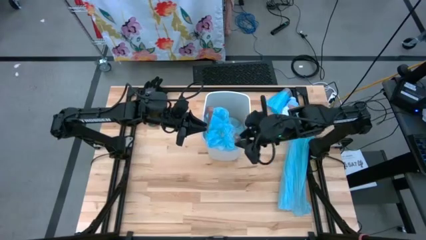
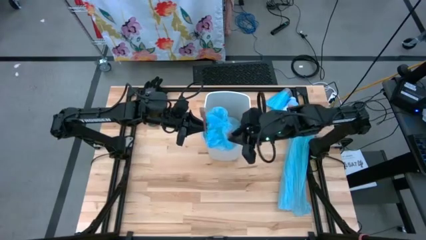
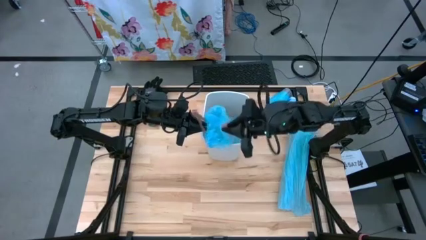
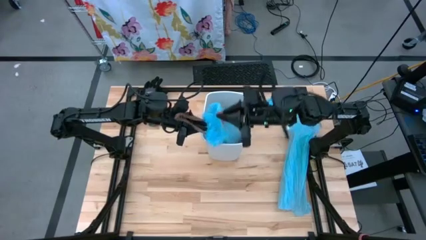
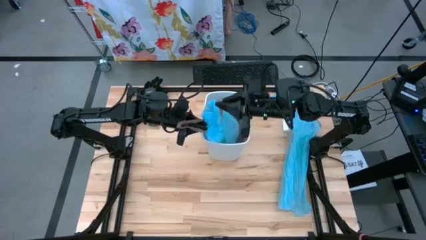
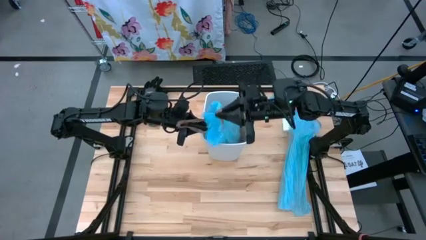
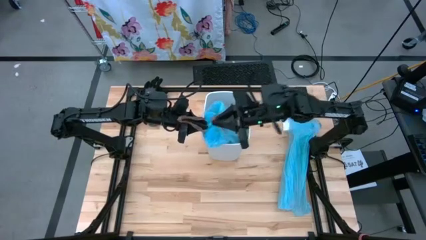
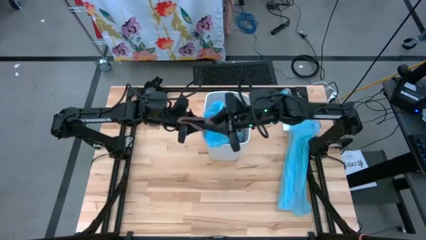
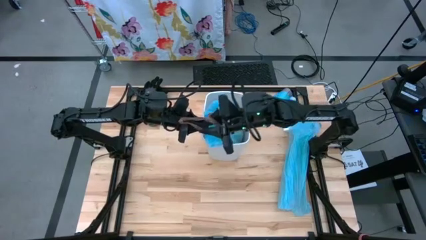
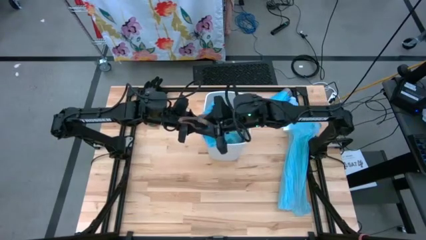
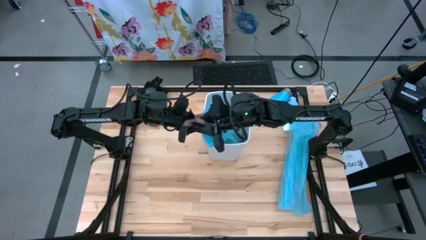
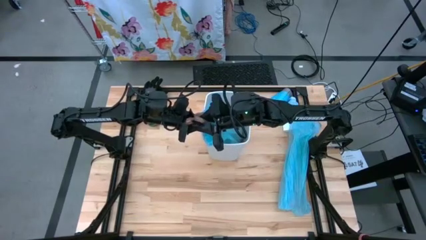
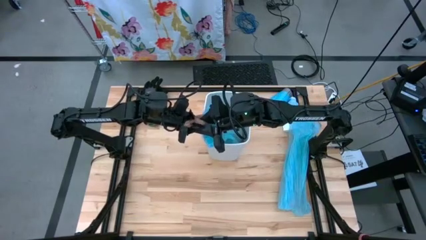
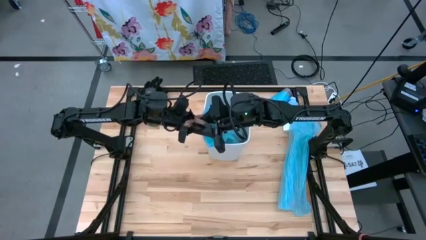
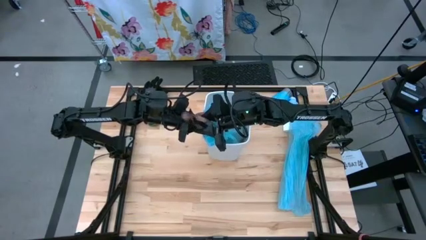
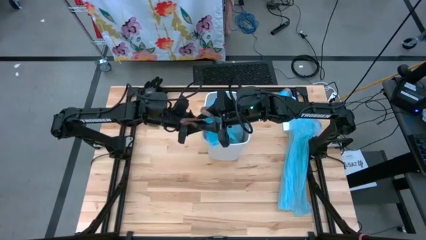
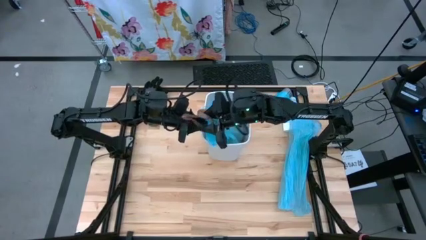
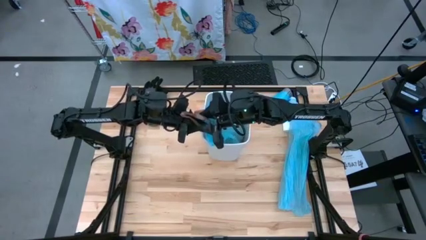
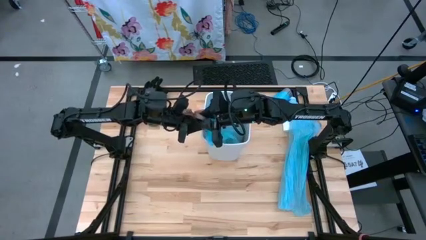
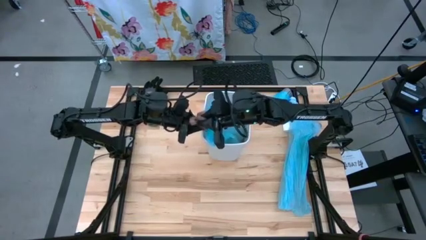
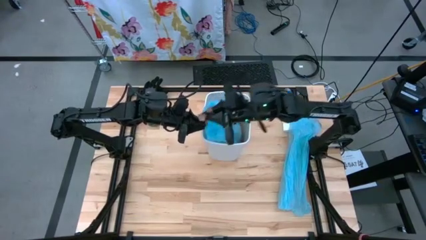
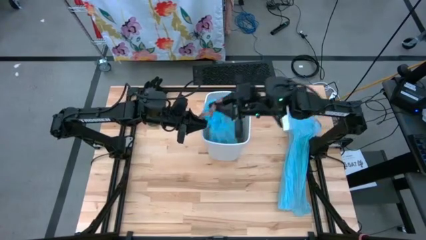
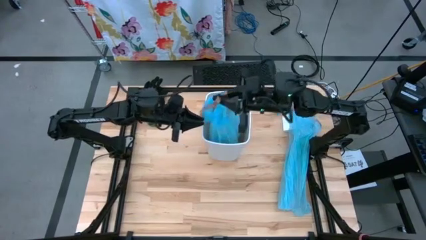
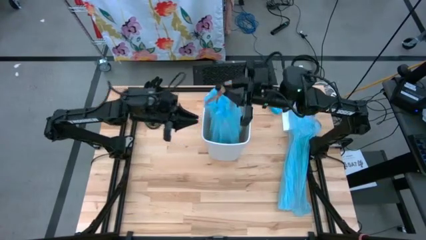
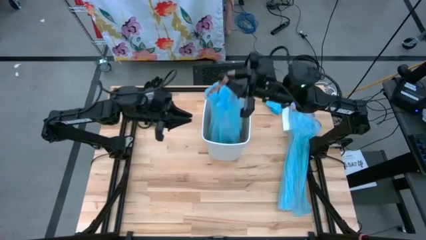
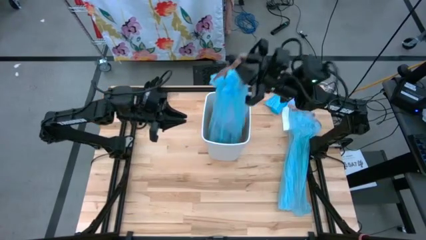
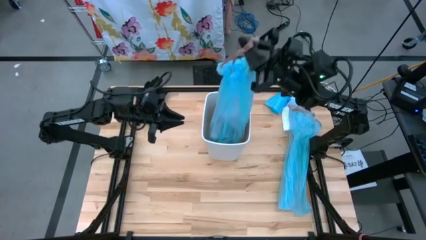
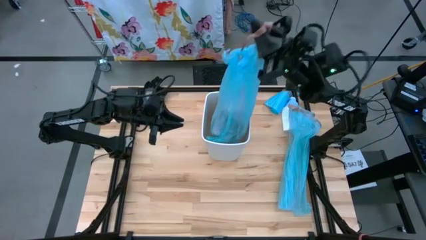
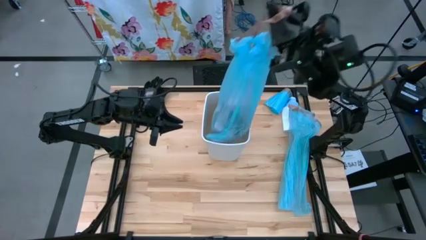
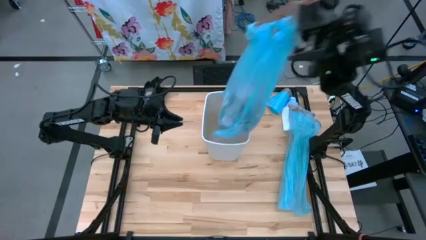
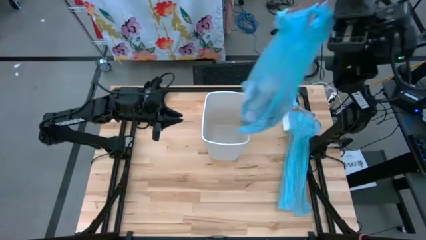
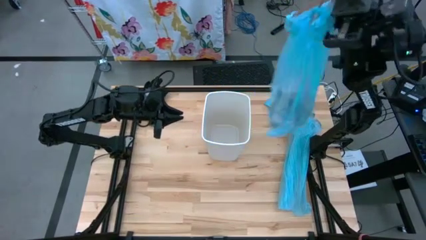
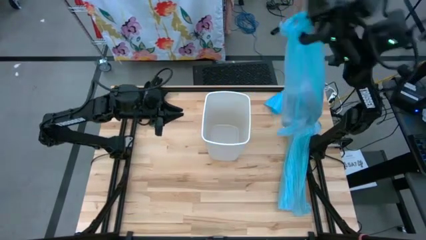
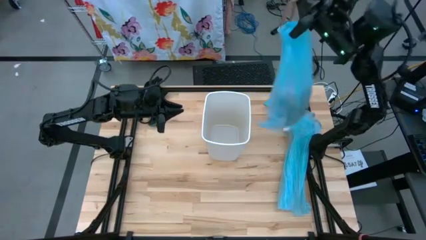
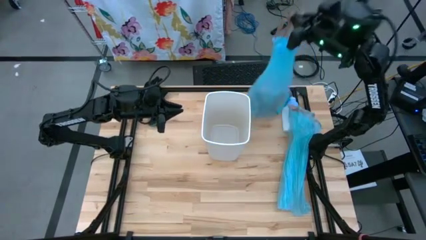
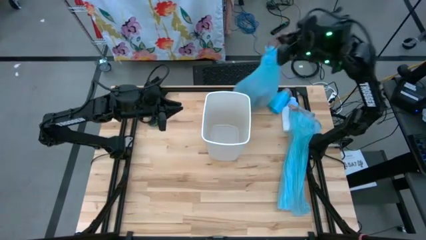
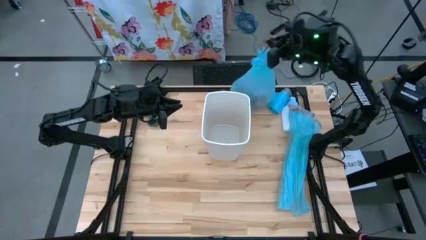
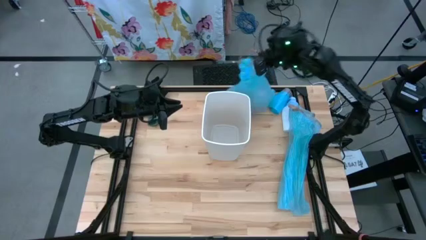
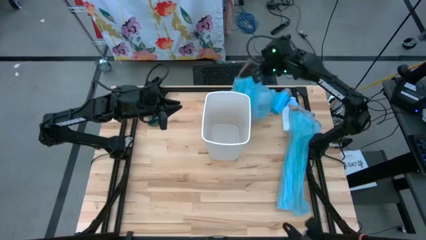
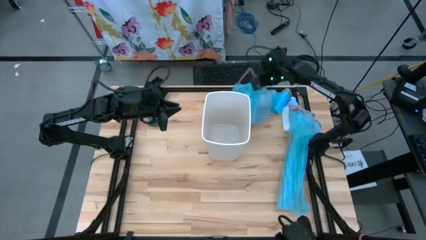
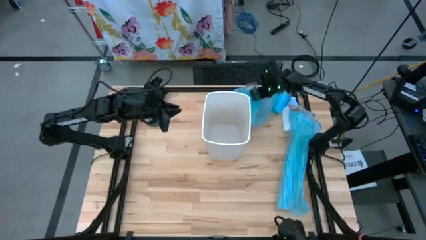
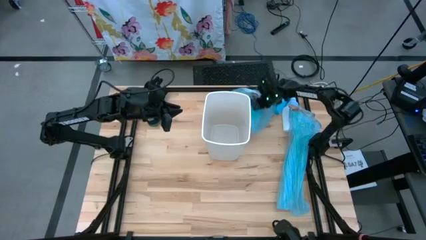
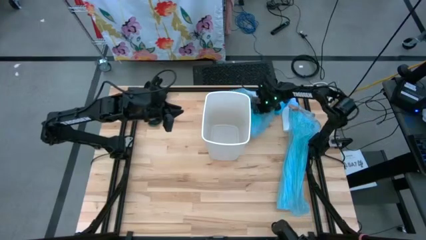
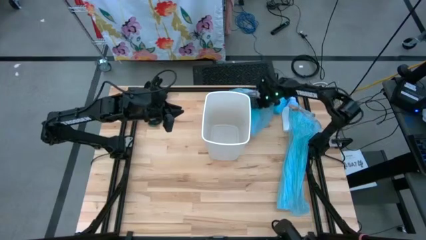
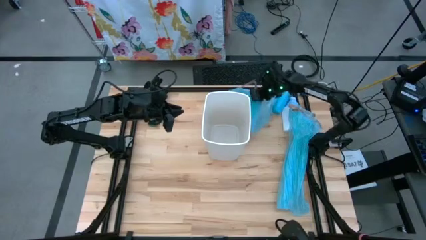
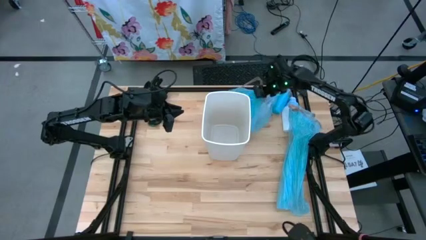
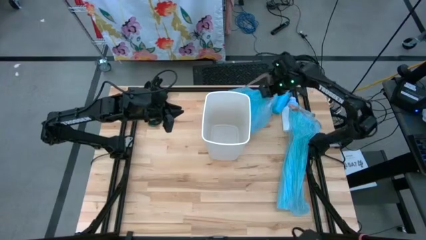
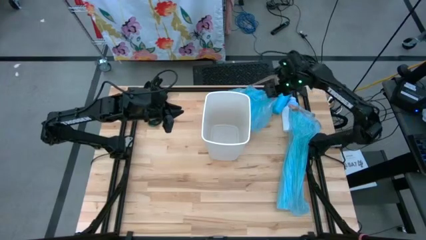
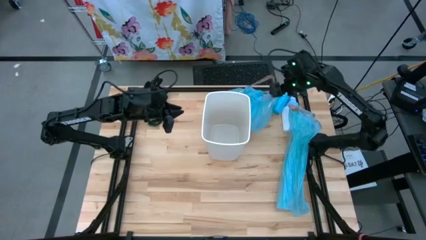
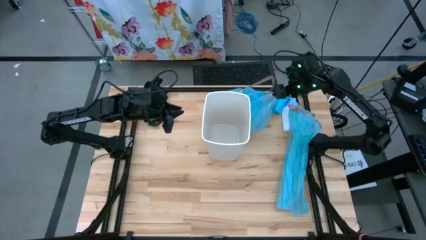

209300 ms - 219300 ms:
Task: place trash/remove bag and relplace
Remove the trash bag from the trash bin

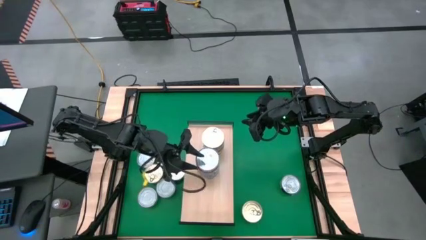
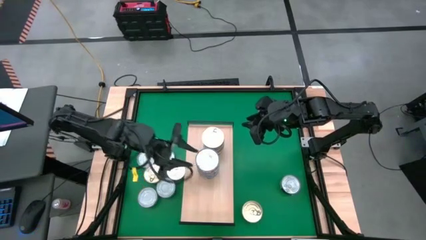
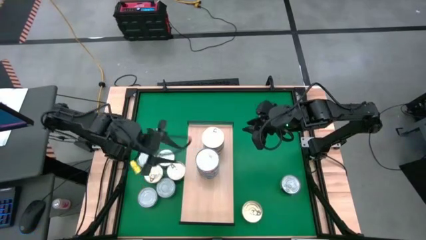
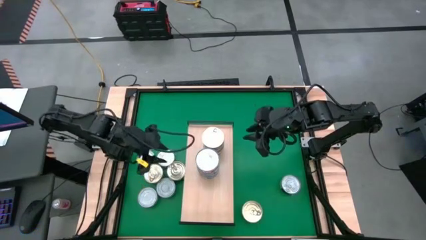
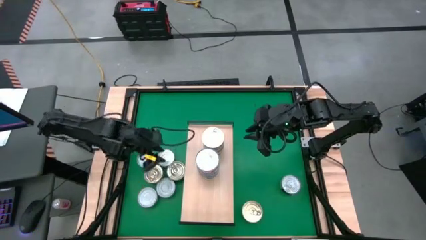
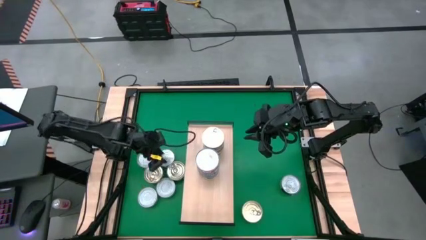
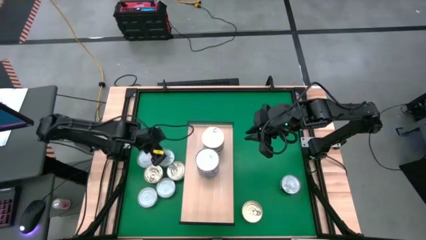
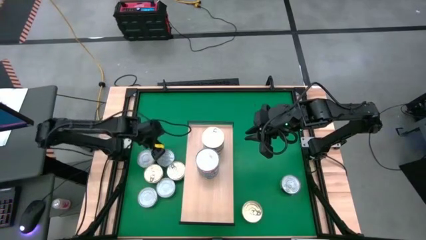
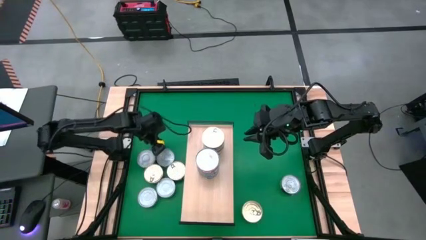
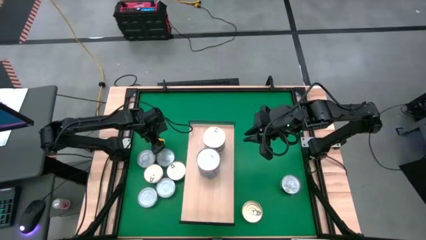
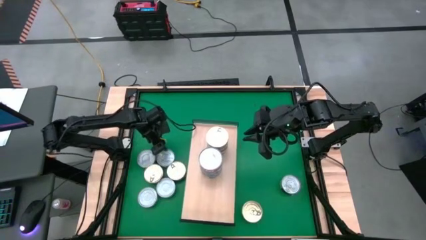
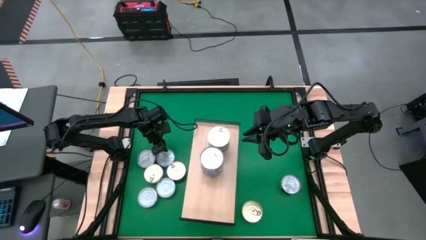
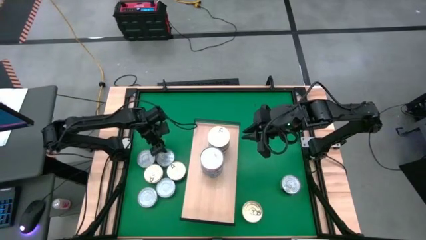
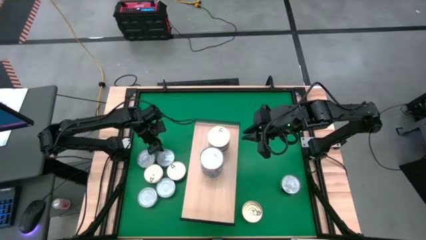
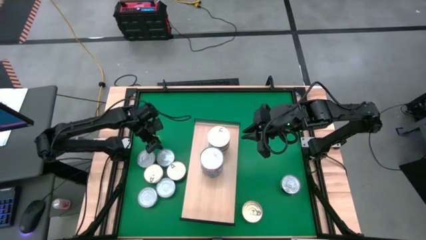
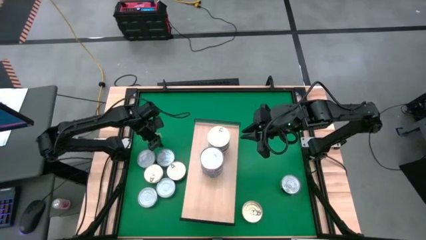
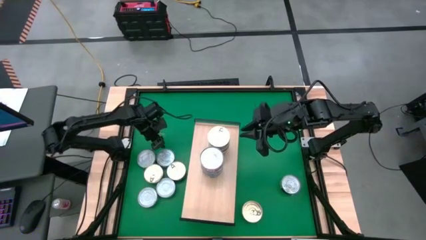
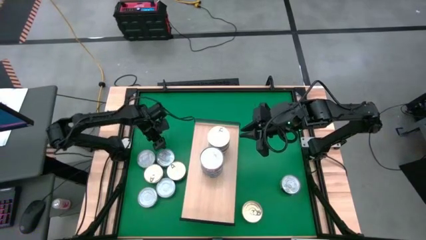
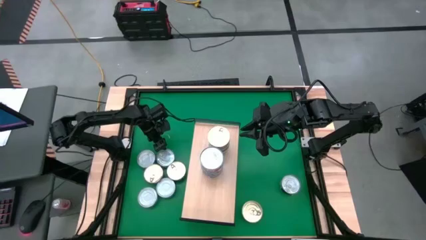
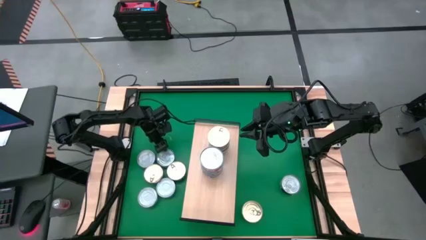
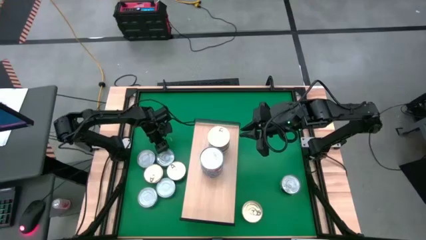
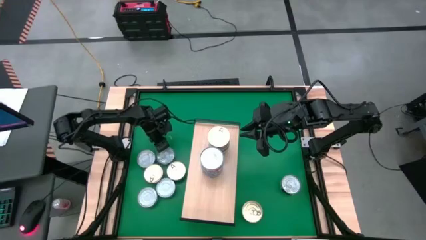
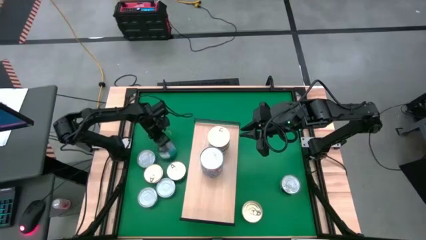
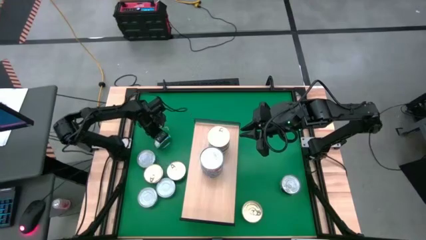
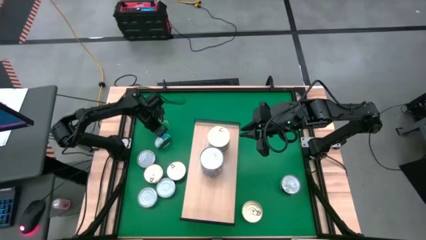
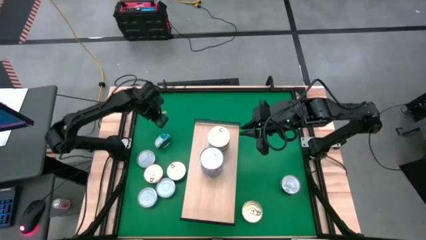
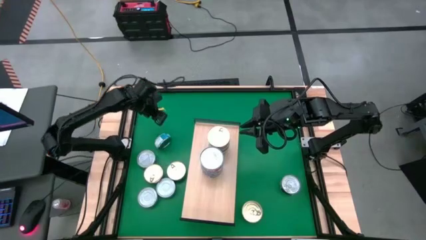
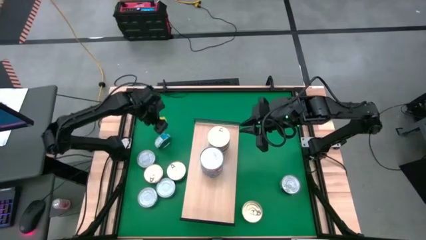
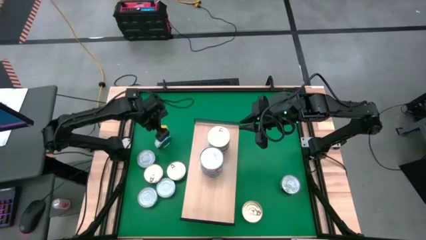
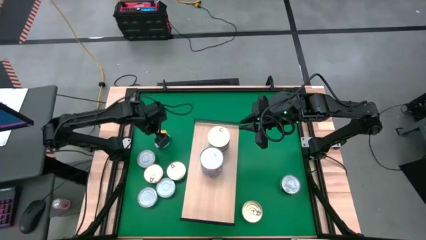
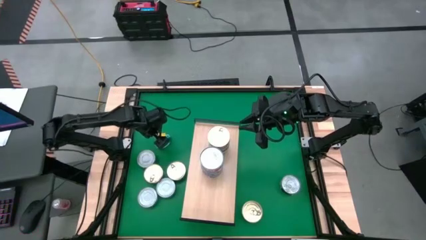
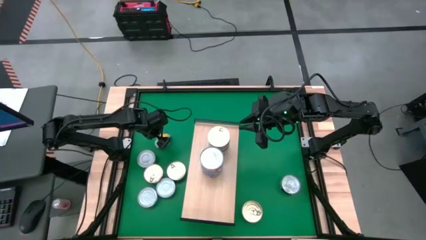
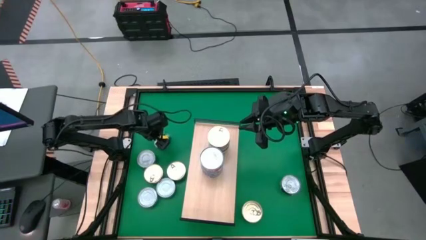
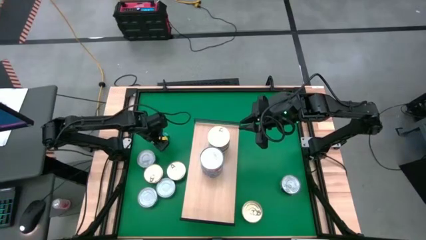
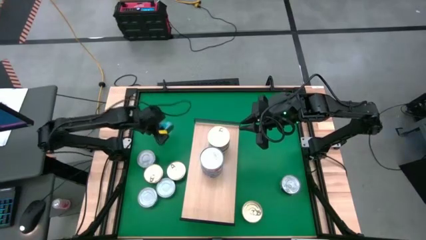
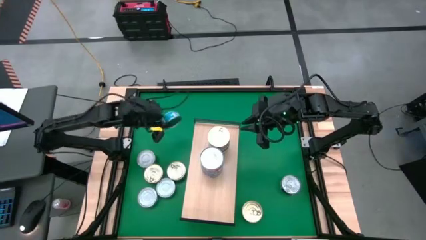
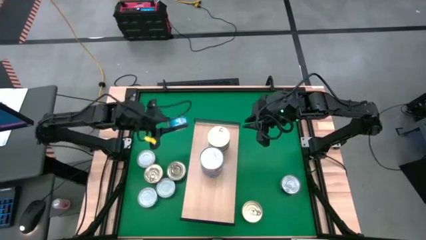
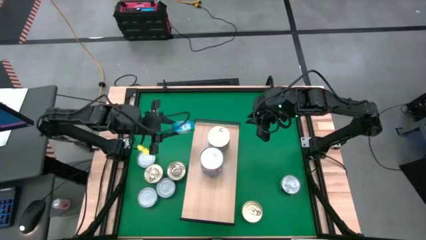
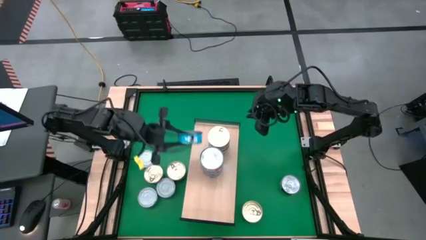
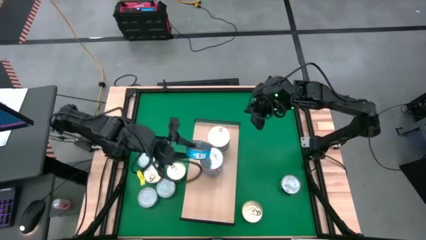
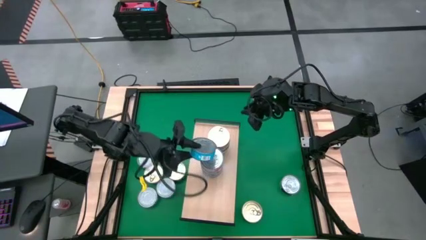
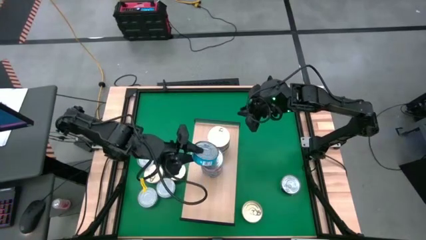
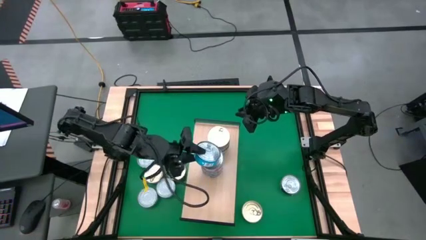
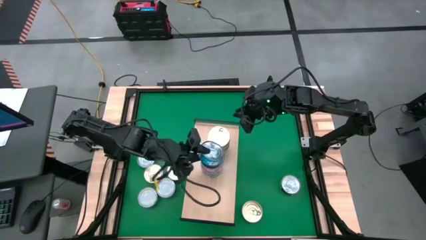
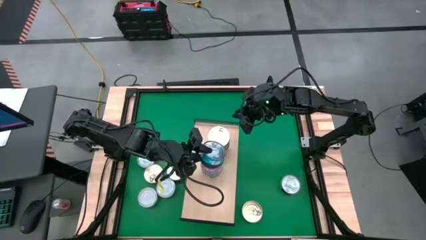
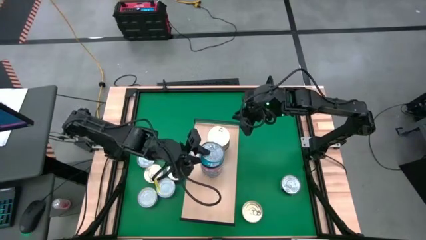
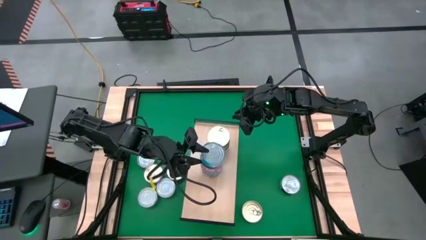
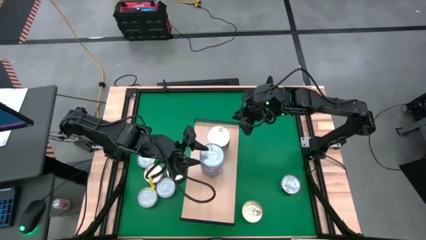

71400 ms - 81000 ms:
Task: Stack canned seafood by type on shelf
Stack the yellow blue tuna can on top of the red tuna can on the shelf
